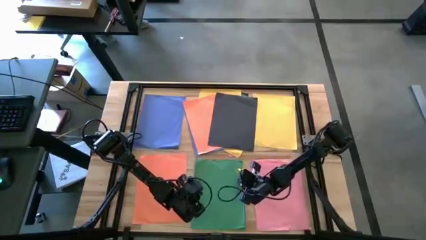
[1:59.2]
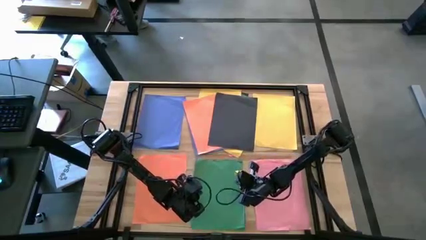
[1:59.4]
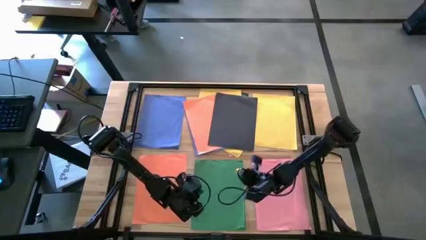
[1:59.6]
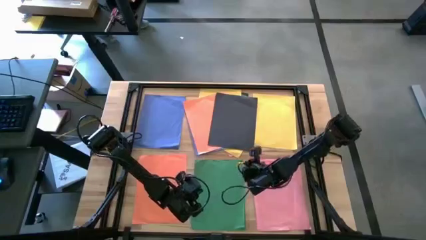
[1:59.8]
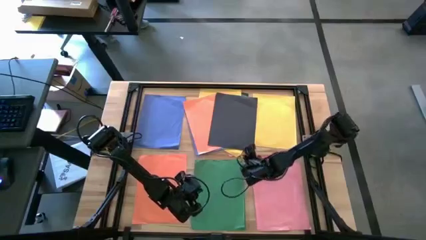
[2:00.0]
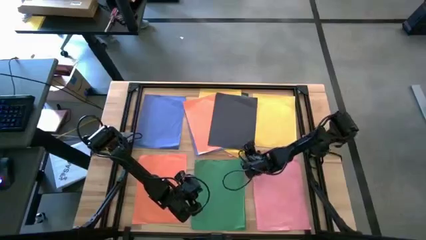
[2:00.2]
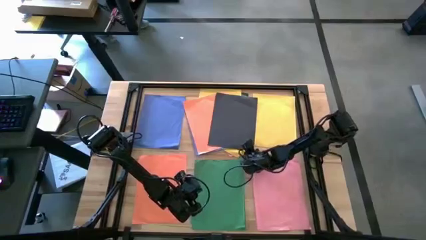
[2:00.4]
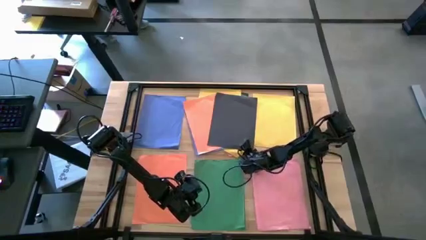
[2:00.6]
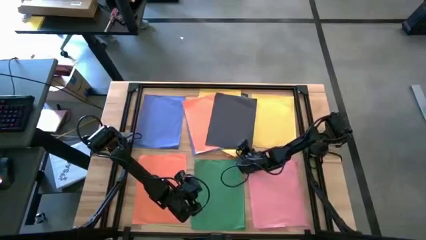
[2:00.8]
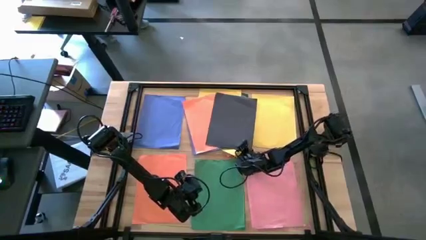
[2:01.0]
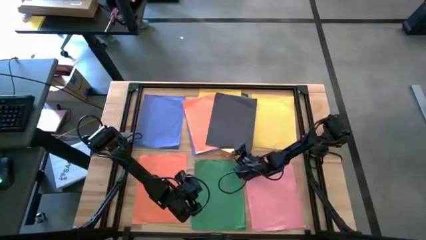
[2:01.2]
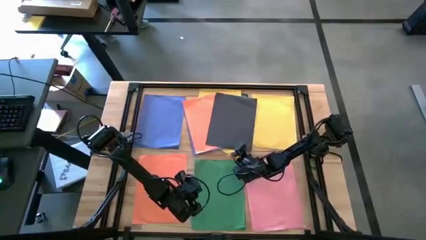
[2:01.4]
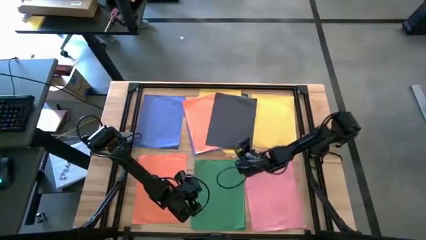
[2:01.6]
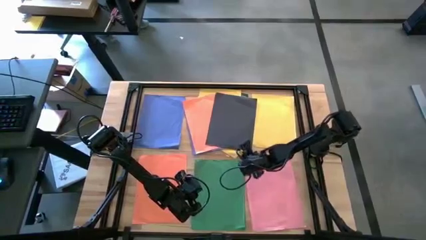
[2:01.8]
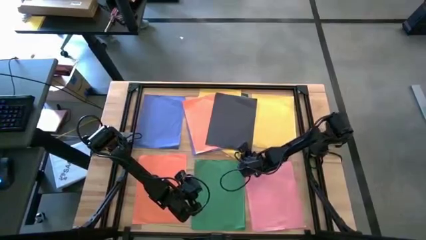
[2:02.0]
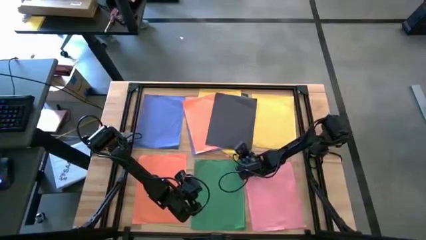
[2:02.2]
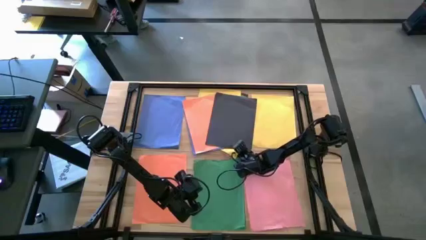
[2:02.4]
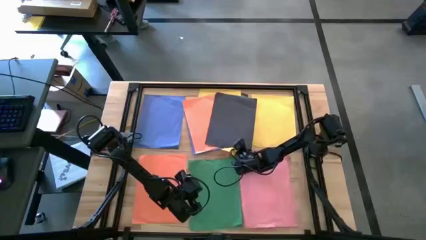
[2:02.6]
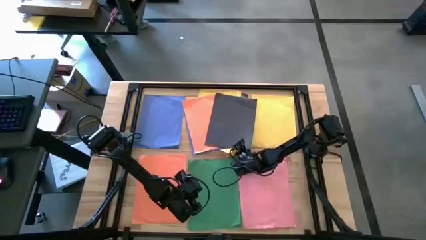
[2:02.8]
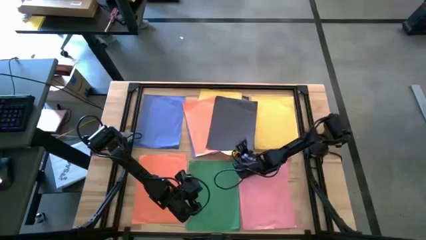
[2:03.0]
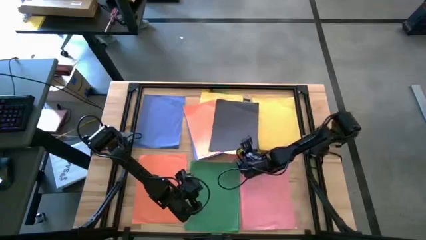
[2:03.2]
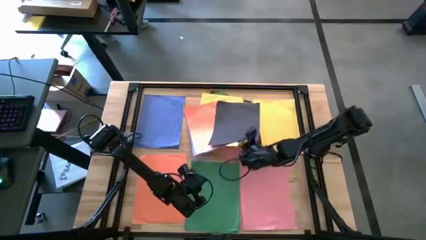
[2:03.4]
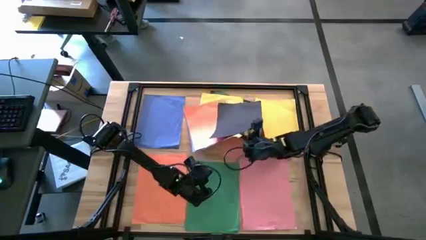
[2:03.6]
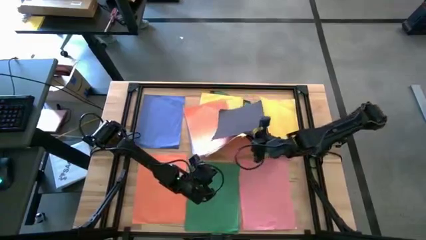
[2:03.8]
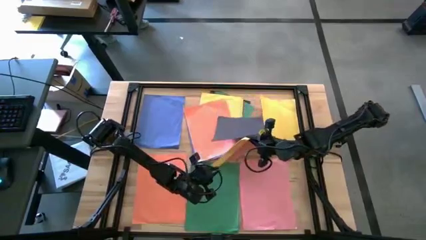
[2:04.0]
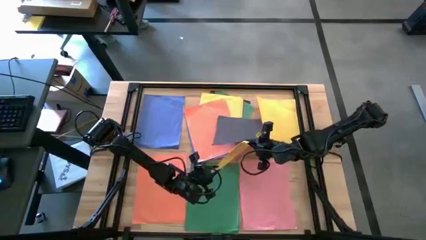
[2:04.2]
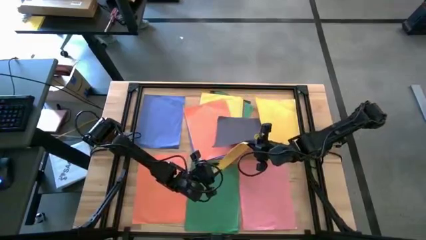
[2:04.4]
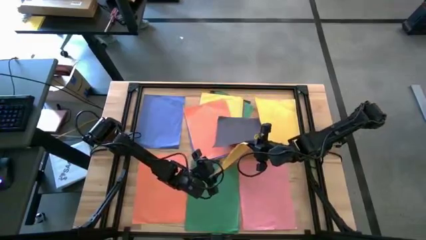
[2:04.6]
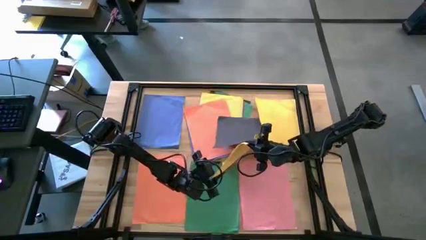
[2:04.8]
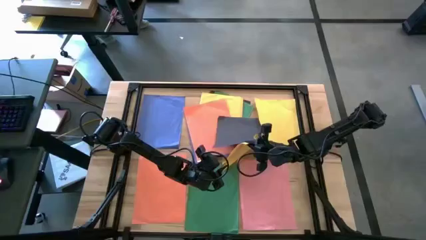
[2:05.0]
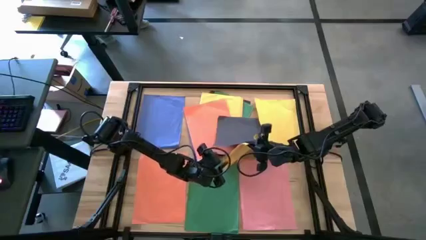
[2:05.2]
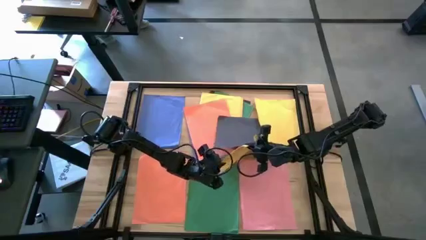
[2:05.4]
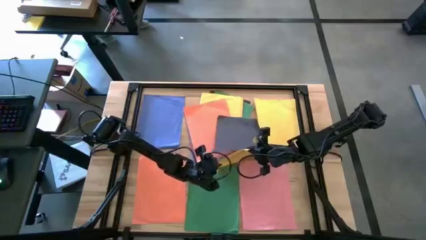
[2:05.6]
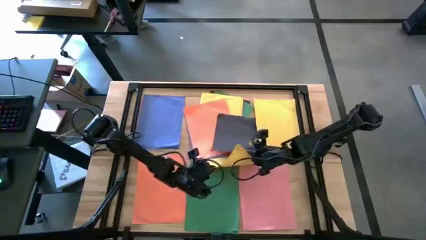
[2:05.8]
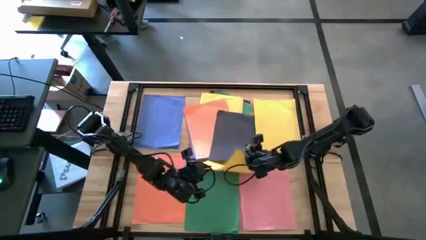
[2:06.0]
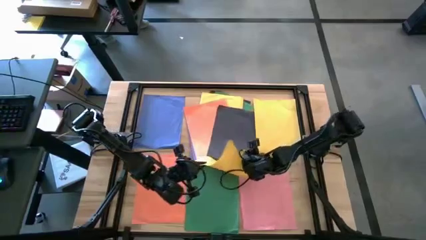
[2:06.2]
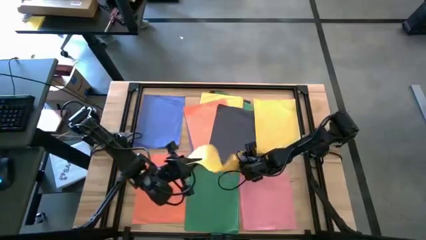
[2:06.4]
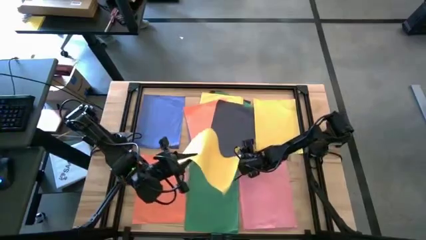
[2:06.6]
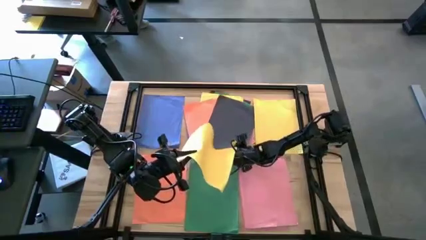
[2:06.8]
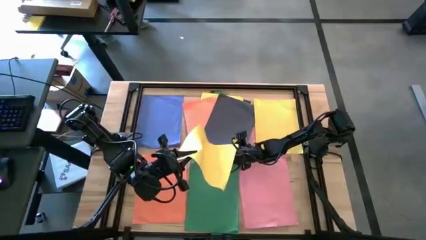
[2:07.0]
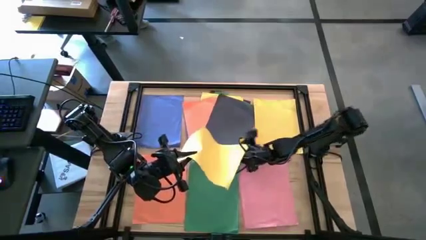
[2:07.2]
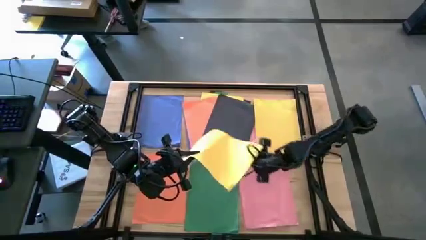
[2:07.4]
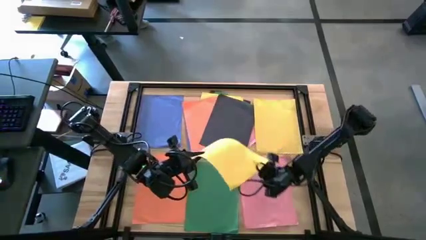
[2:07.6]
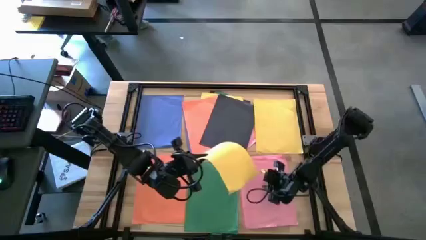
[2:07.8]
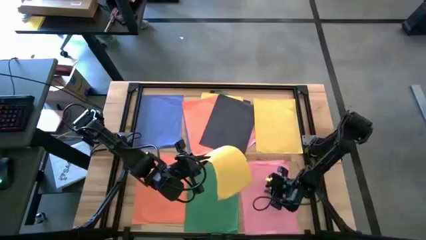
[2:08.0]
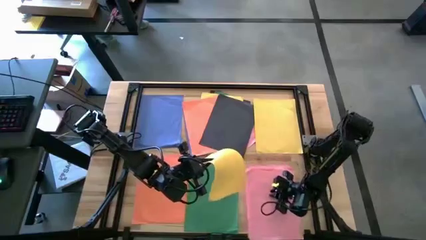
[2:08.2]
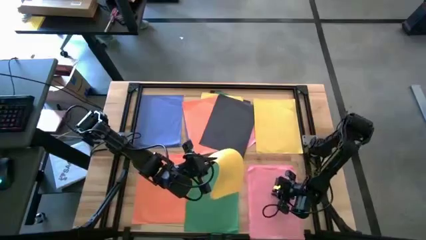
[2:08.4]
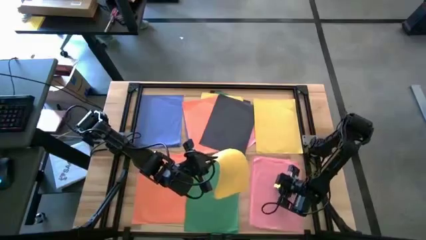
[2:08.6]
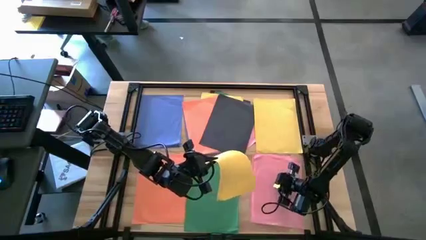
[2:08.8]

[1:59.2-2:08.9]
Task: Organize paper
Stack the yellow paper under the colored papers on the right yellow paper

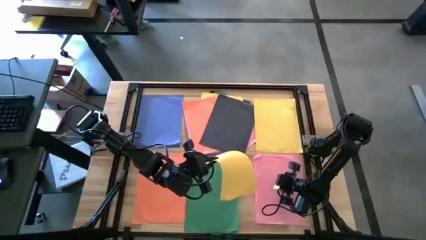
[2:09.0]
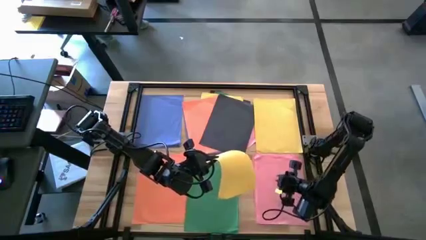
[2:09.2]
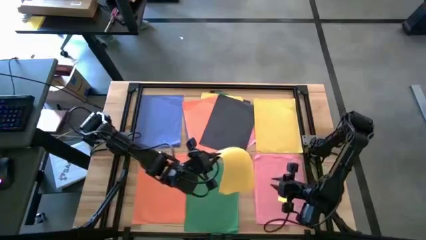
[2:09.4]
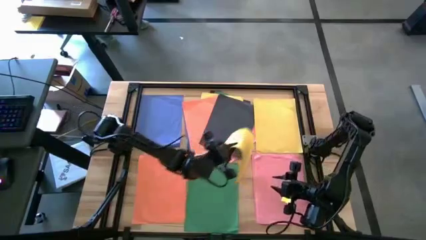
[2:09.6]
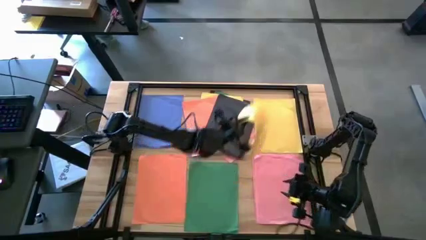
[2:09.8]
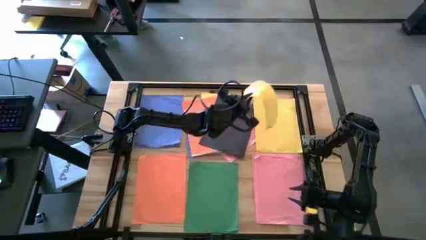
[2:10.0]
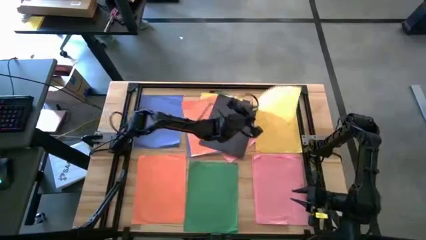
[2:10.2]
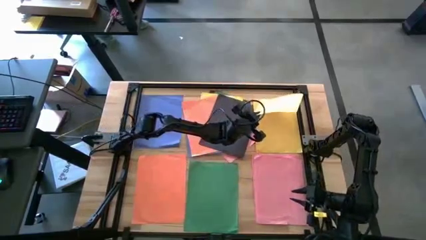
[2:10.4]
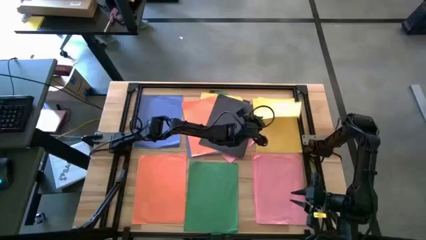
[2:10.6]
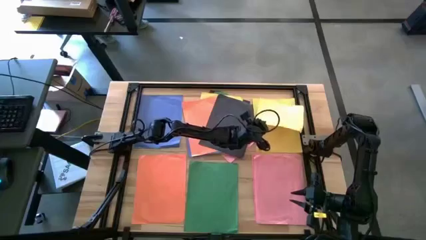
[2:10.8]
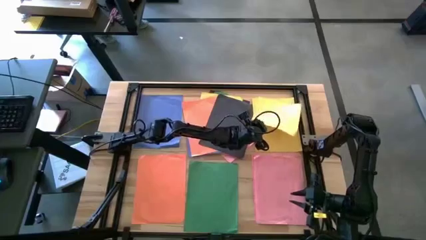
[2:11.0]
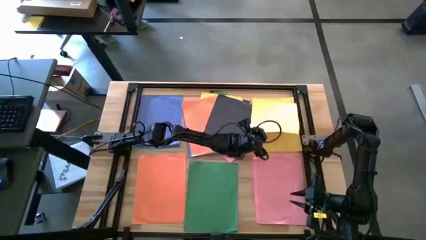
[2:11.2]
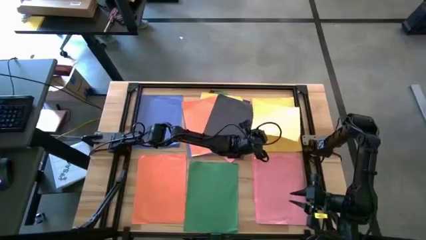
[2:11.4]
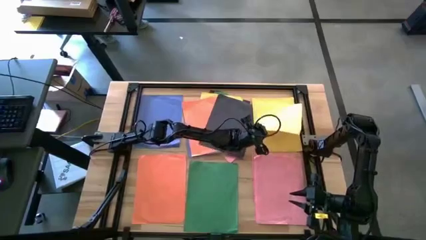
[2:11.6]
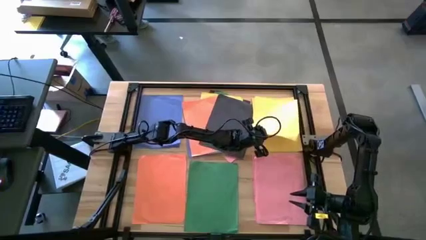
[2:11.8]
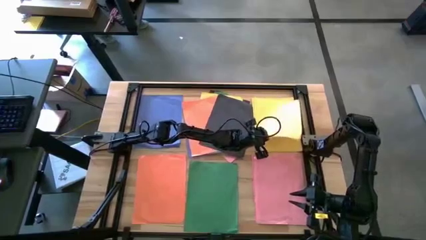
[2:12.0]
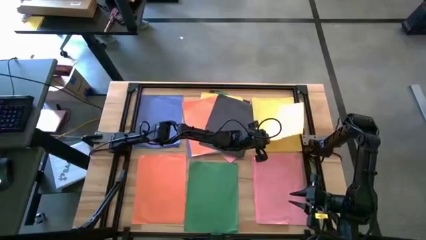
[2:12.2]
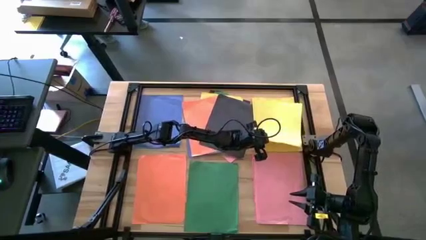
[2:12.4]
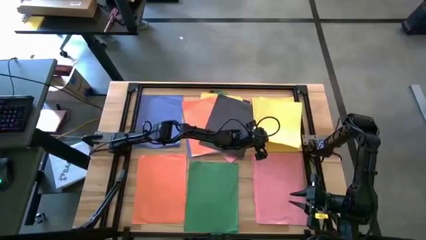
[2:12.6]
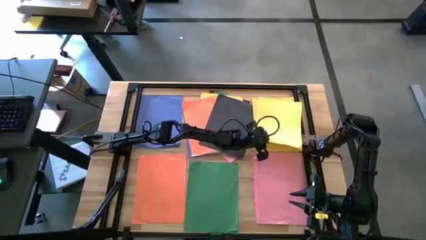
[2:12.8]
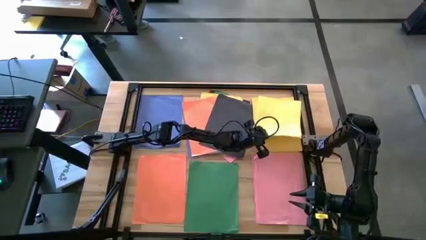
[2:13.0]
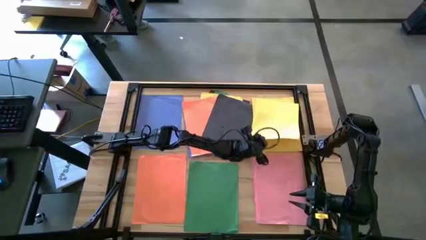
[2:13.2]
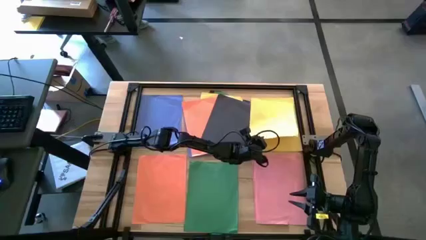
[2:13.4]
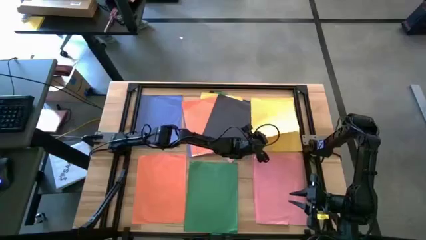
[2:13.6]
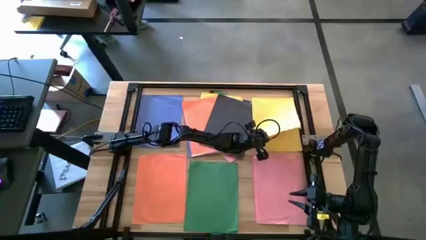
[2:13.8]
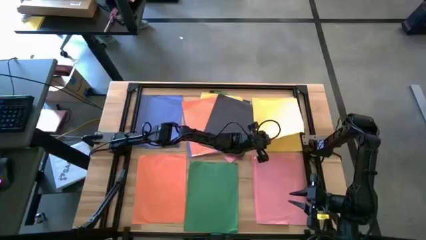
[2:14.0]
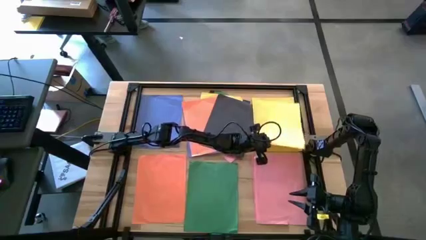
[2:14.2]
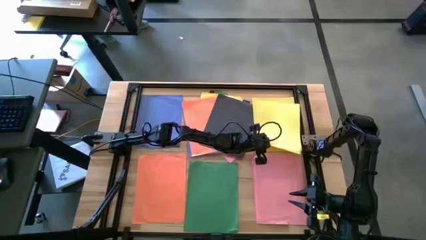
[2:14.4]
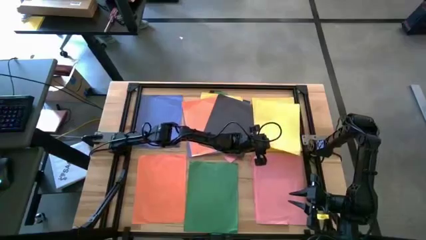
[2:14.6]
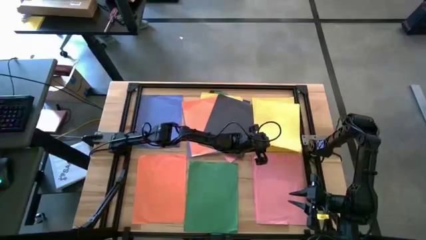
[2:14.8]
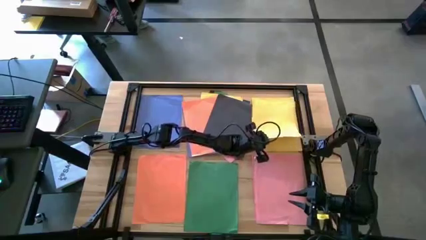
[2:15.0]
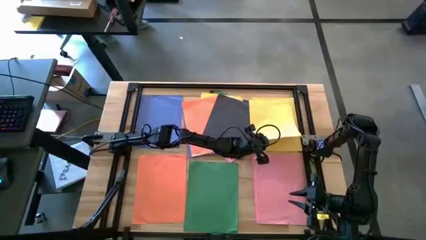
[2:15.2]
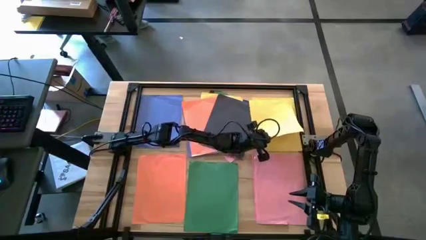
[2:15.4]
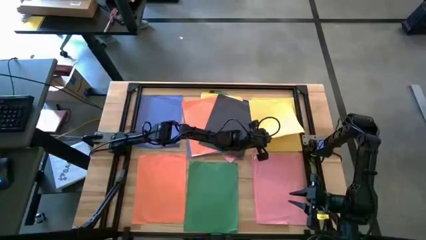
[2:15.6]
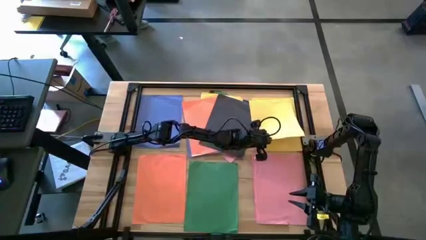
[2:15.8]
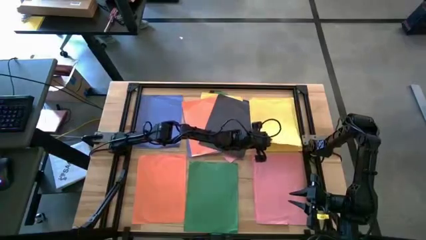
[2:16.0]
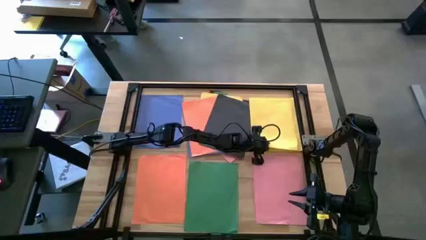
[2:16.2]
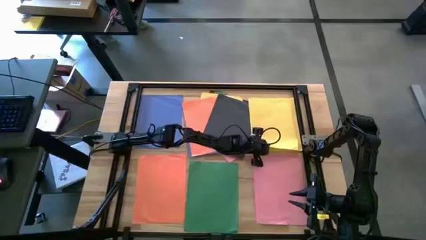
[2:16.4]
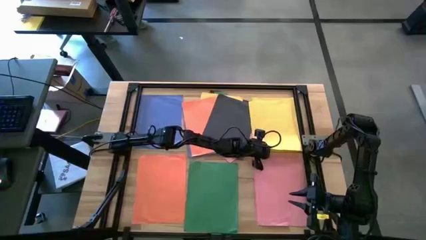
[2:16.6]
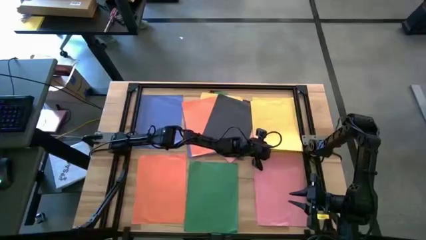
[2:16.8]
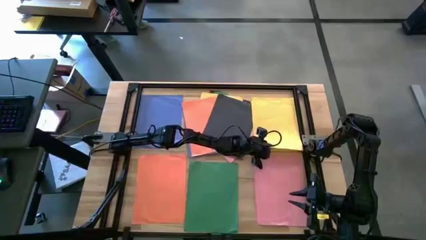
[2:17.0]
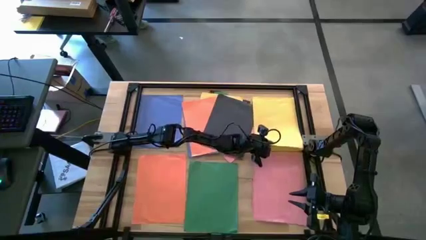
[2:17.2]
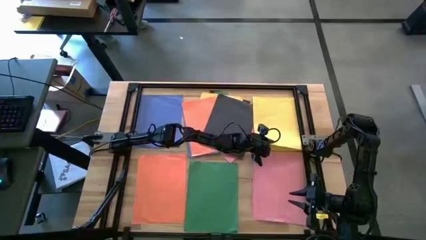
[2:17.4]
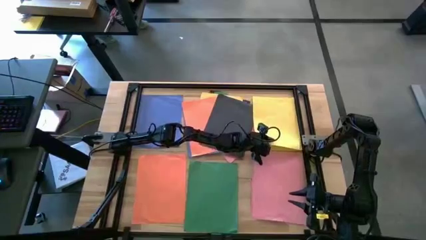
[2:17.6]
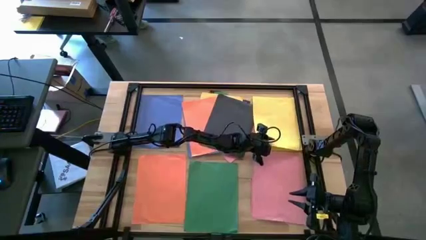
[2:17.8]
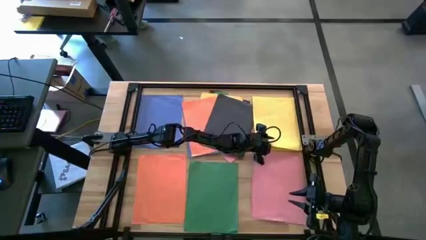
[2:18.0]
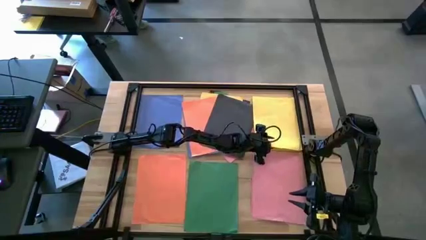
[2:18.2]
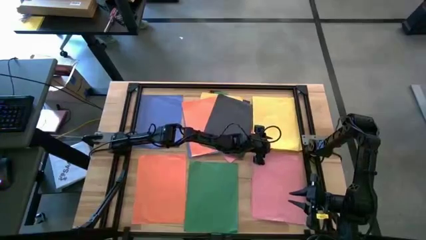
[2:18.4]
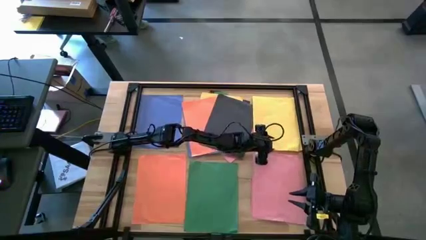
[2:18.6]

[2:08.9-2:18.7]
Stack the yellow paper under the colored papers on the right yellow paper
